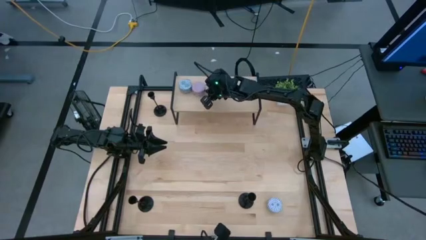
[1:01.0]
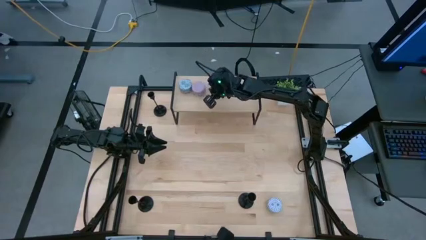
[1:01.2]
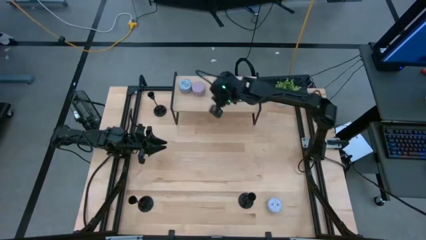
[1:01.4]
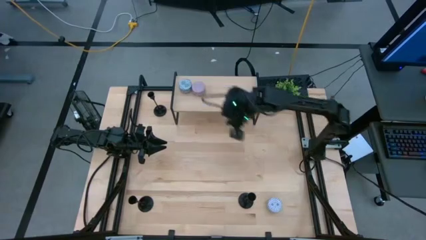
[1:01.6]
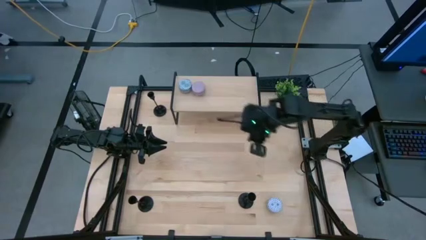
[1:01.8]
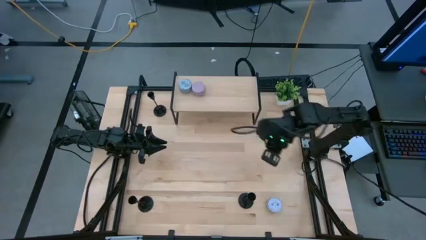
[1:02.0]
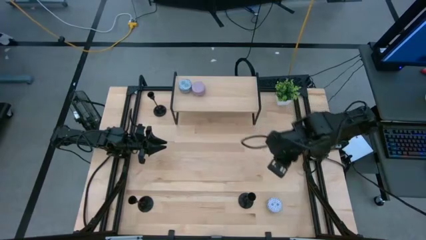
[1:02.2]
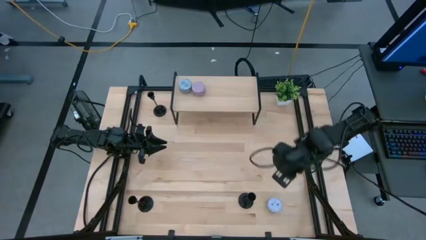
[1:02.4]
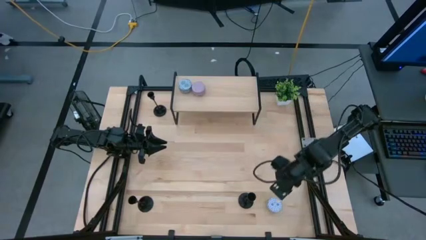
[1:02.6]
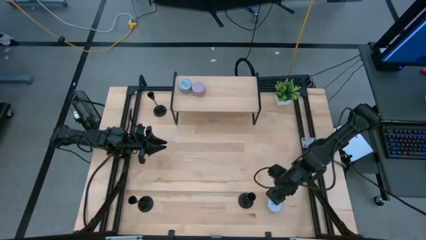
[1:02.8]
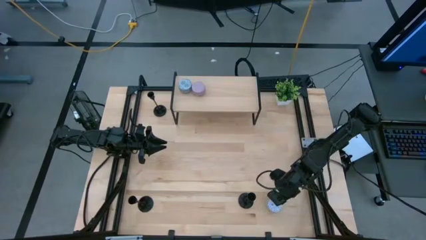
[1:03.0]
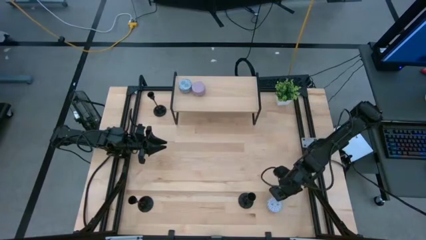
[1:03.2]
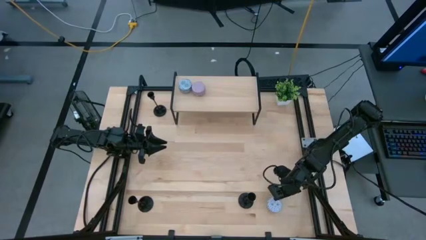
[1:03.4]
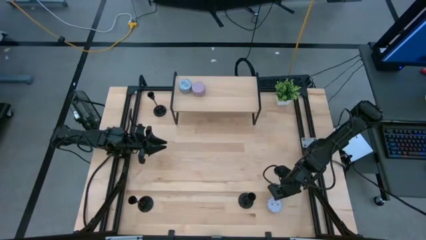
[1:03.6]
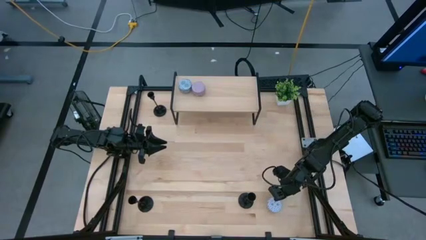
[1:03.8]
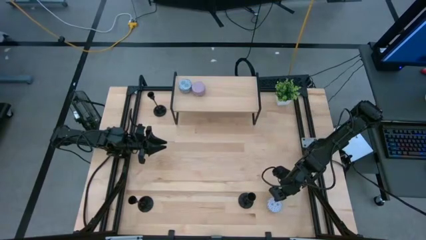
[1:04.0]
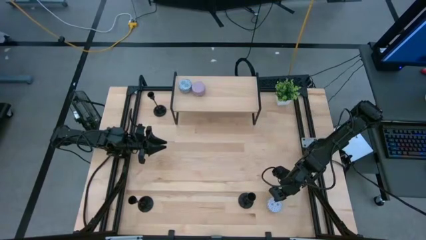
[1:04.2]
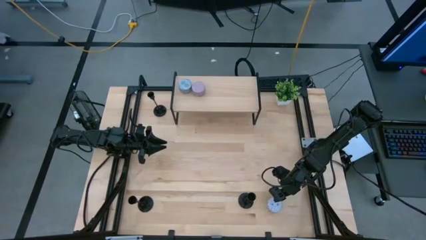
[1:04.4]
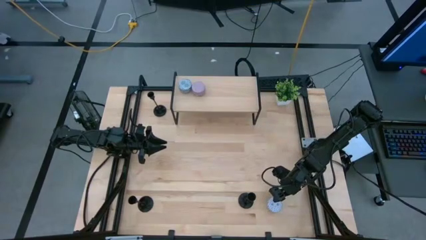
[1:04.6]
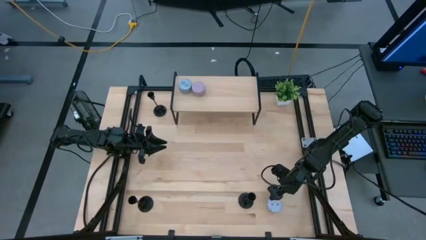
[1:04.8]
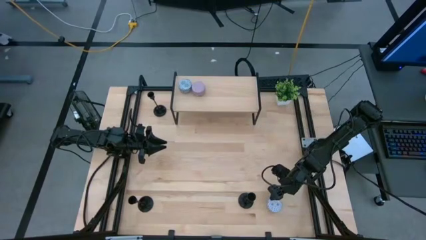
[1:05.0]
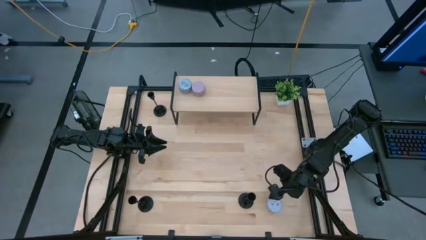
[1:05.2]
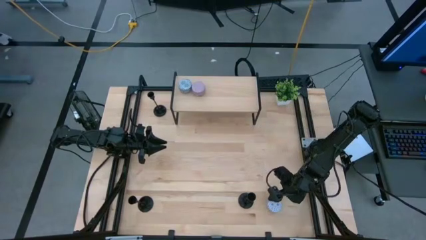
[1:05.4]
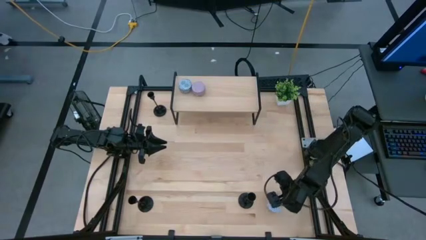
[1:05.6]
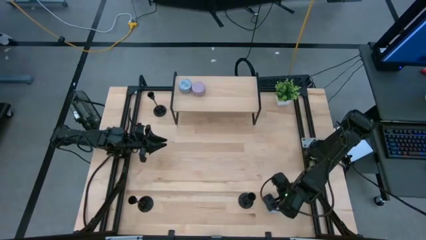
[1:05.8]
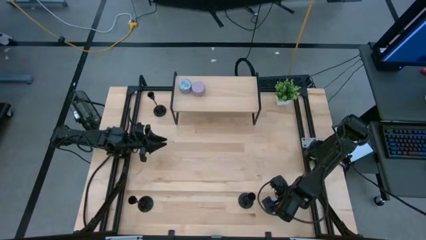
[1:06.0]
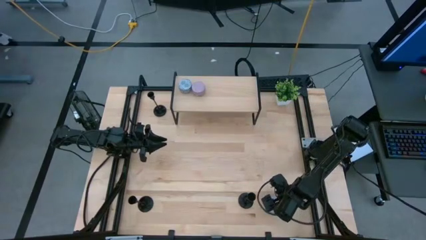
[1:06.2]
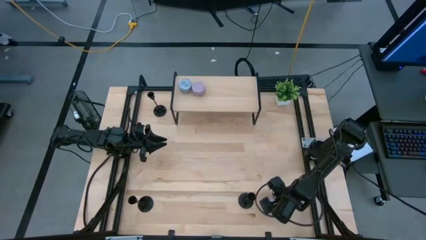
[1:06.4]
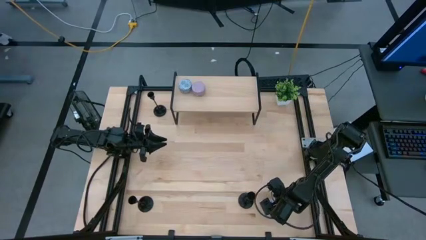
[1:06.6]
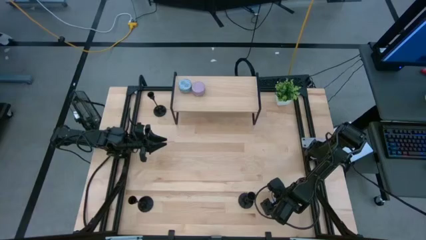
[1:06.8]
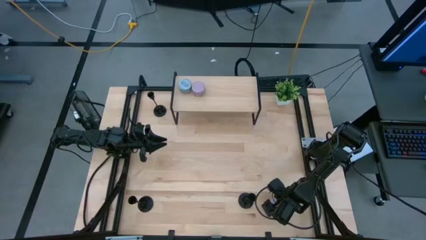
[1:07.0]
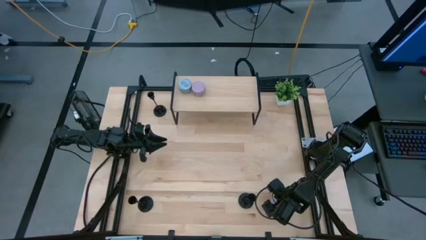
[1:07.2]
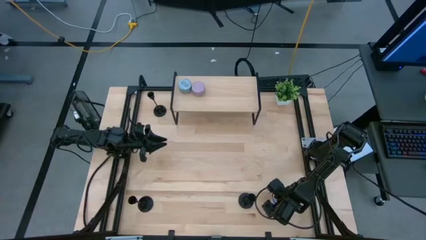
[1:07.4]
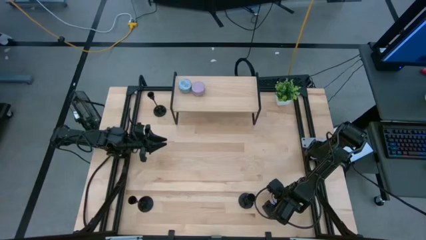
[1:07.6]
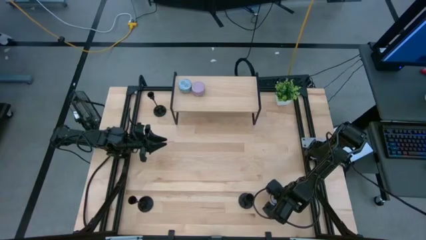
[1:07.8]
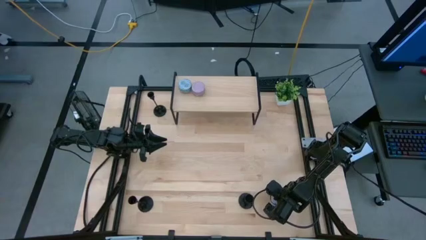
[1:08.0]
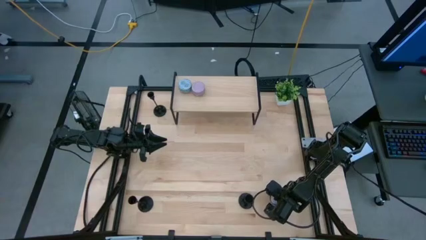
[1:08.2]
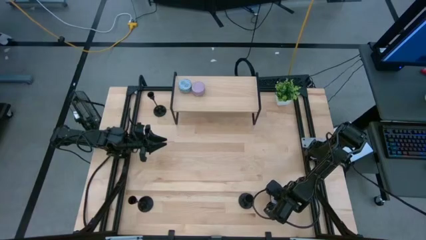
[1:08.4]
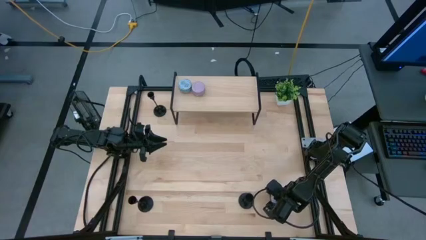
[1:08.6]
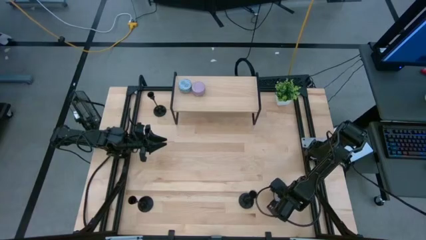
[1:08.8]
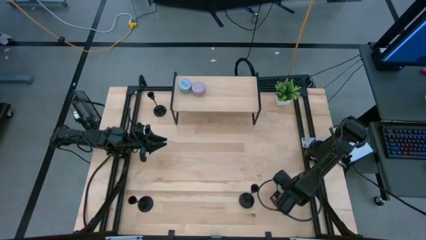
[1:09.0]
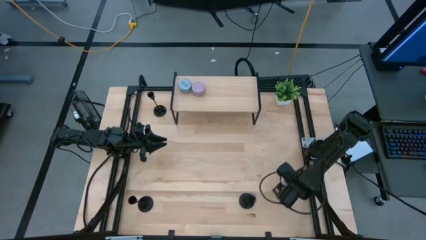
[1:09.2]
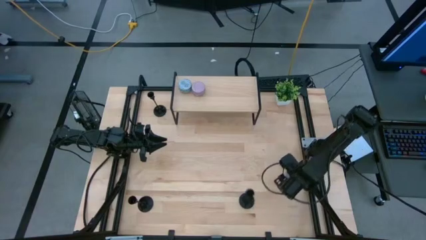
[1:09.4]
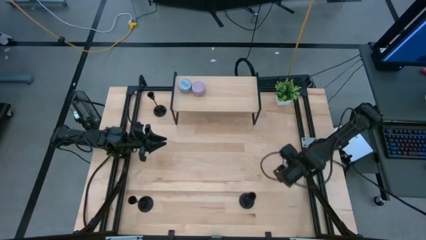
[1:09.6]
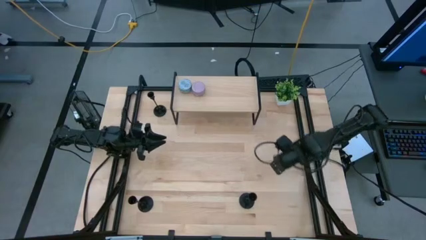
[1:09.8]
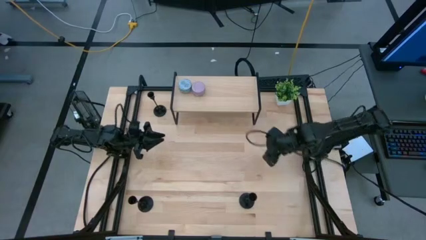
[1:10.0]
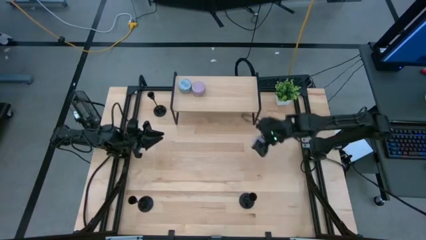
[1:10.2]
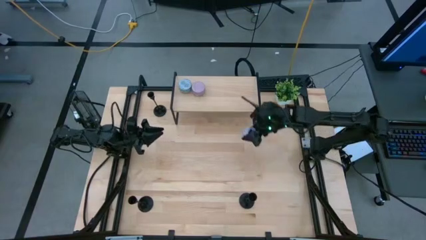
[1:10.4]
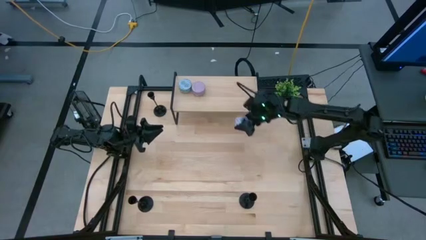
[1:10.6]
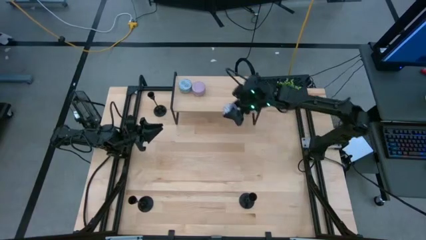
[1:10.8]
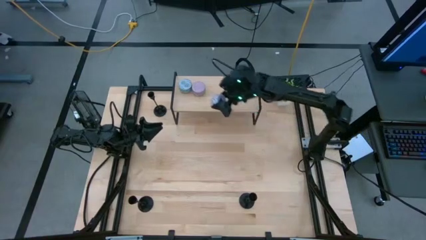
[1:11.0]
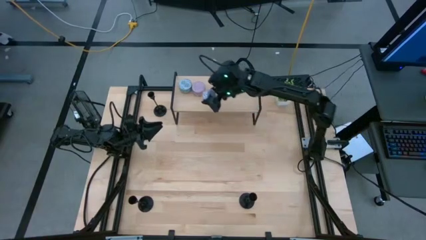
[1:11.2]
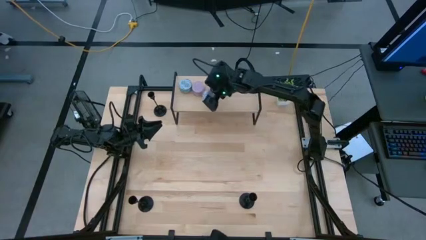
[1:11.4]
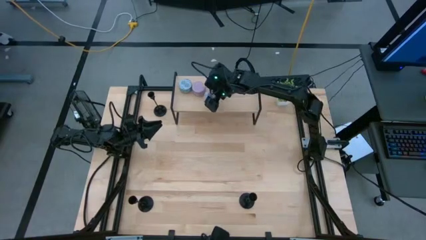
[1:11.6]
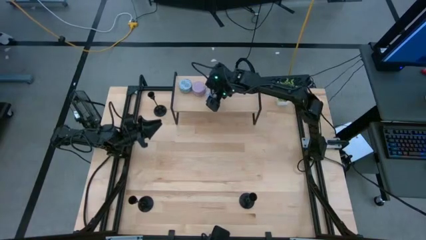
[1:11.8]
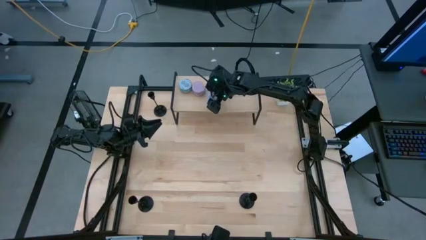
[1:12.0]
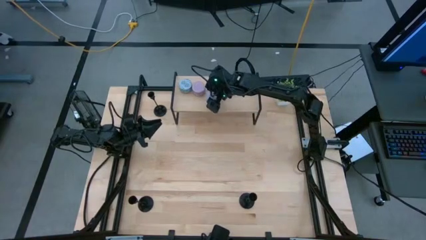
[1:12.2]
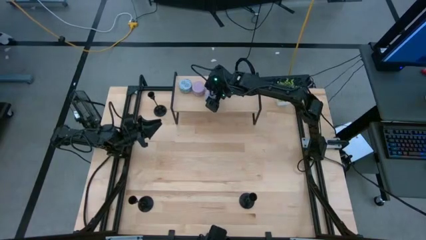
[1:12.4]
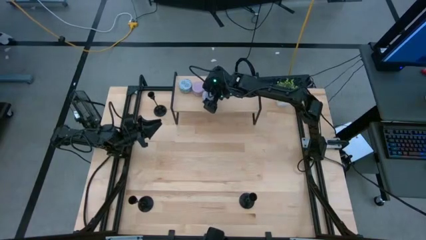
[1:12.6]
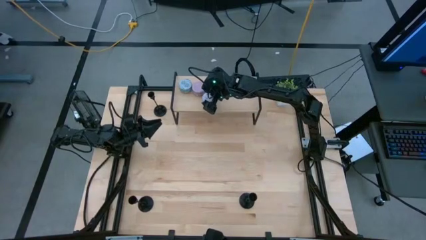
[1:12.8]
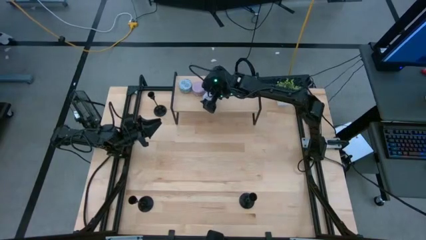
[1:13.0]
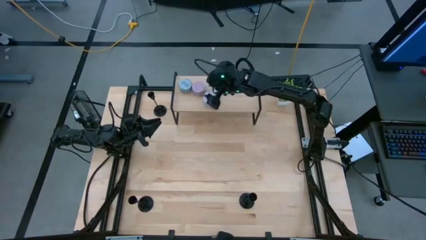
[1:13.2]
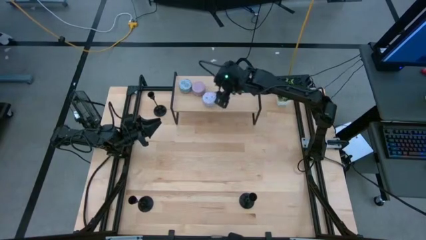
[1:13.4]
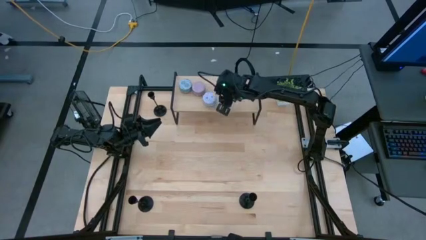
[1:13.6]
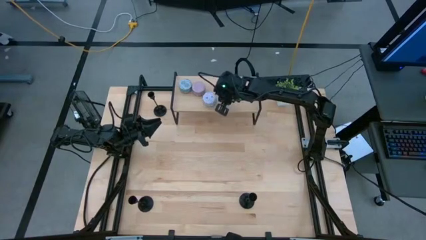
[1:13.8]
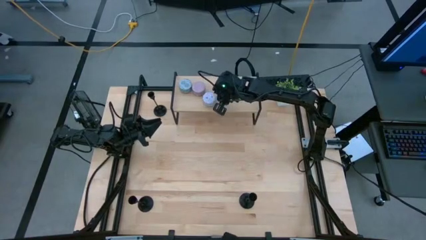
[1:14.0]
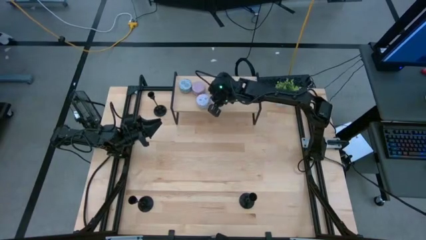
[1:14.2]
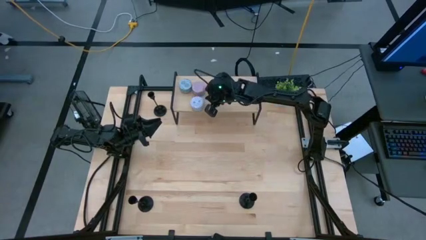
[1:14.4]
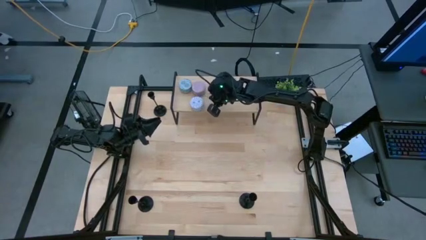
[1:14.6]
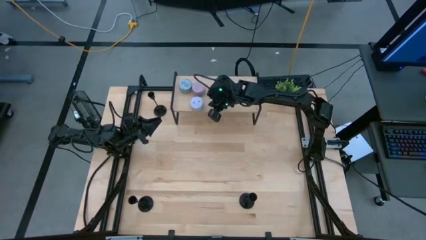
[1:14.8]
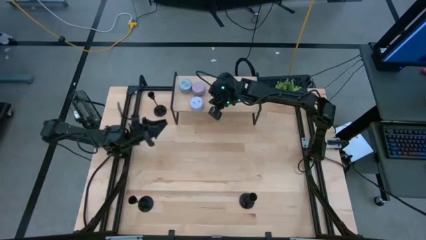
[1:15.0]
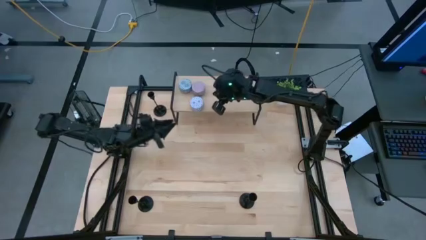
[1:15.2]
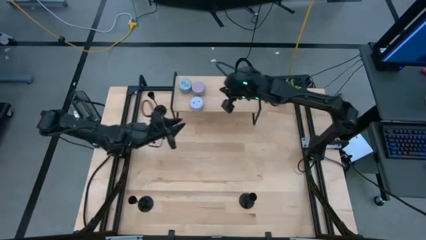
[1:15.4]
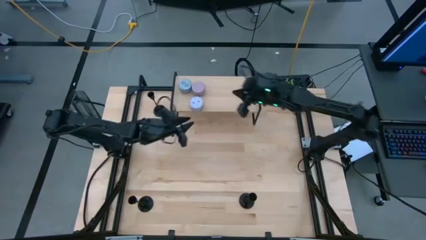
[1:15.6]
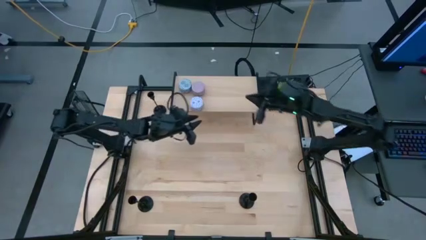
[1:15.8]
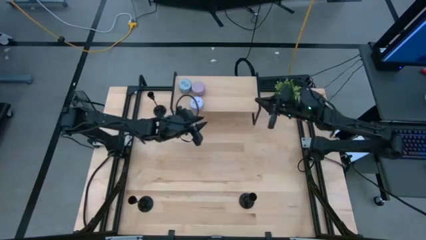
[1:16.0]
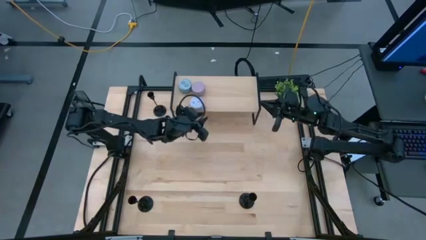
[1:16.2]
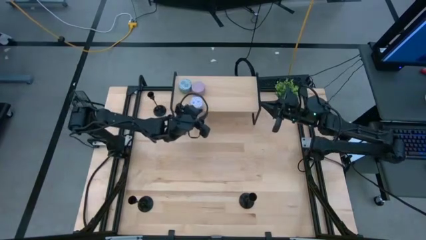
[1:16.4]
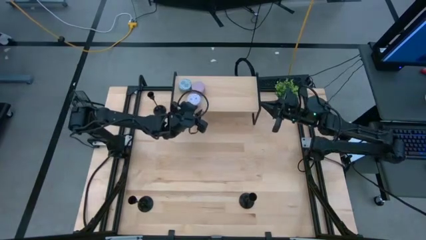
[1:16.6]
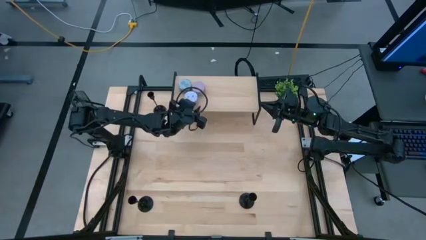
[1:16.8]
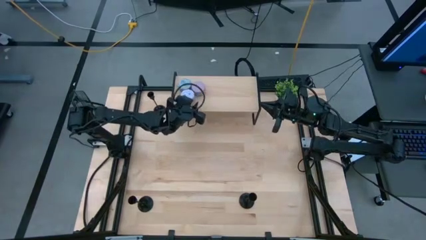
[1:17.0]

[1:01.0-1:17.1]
Task: Pick & Place candle stick holders
Put the red patterned scented candle on the shelf
